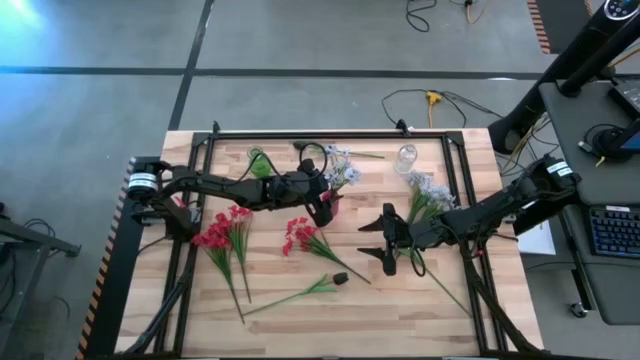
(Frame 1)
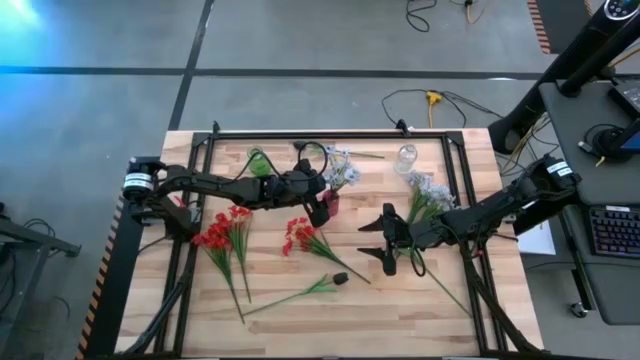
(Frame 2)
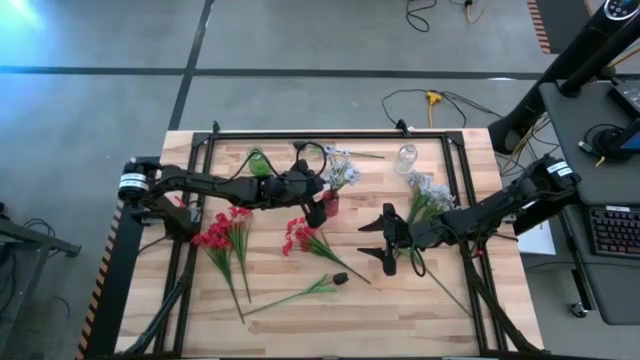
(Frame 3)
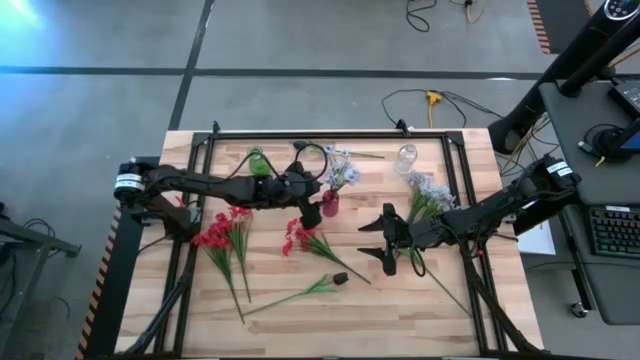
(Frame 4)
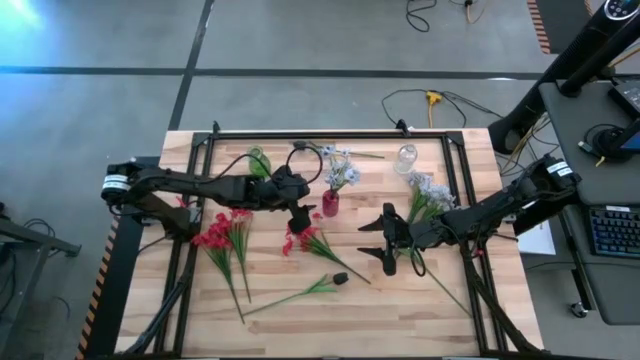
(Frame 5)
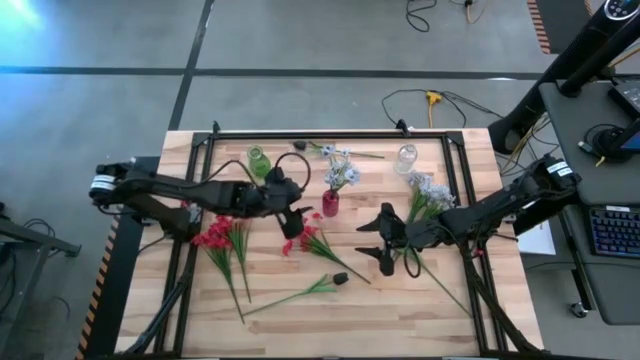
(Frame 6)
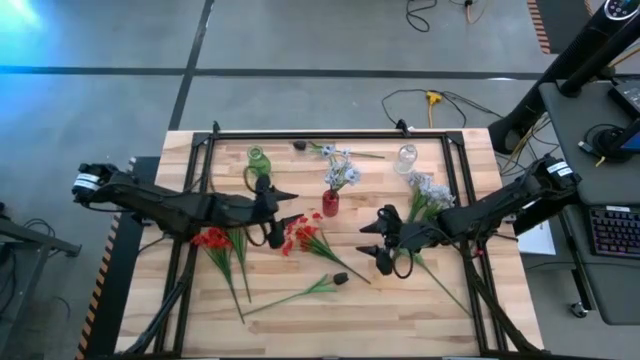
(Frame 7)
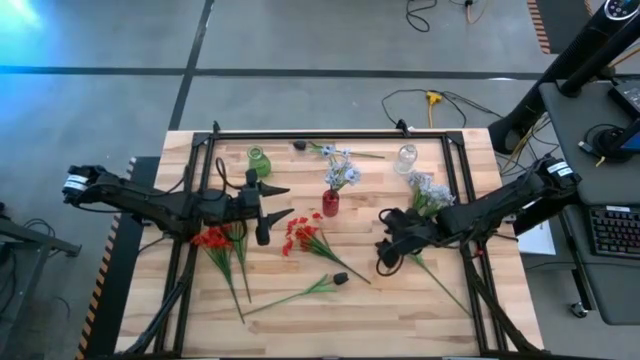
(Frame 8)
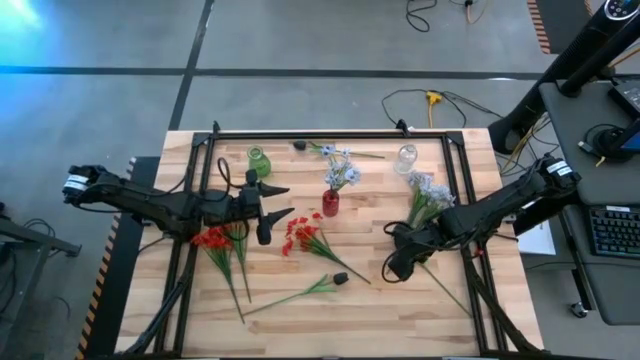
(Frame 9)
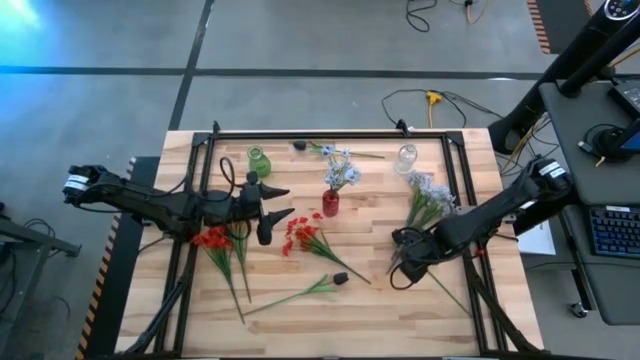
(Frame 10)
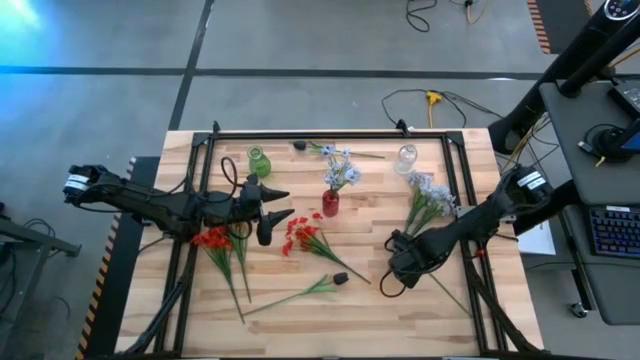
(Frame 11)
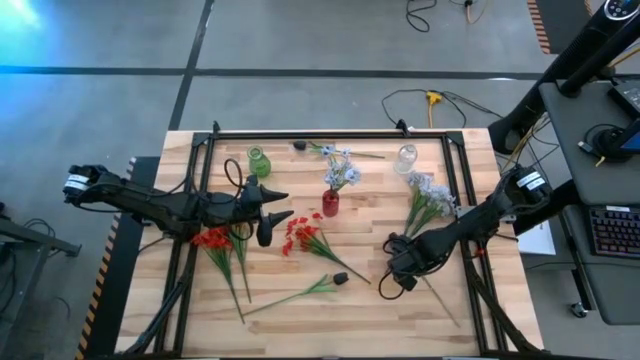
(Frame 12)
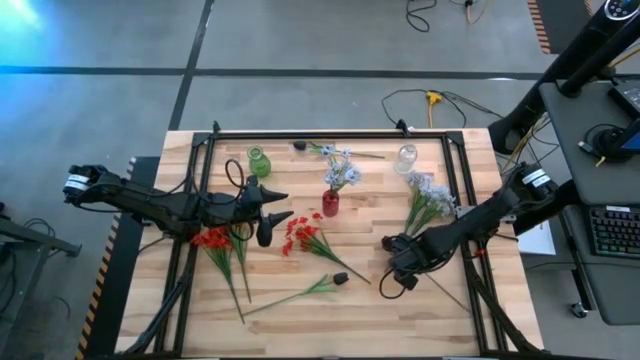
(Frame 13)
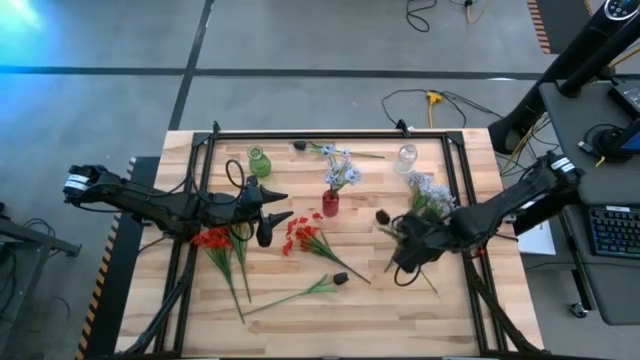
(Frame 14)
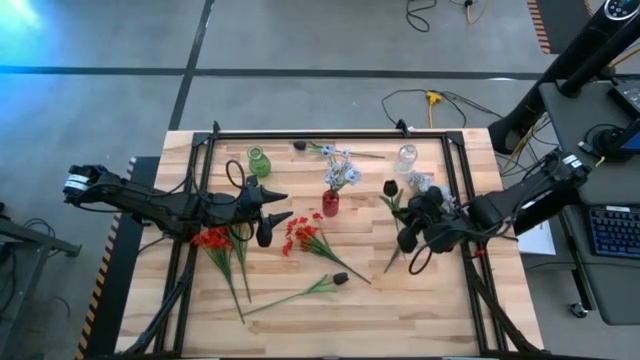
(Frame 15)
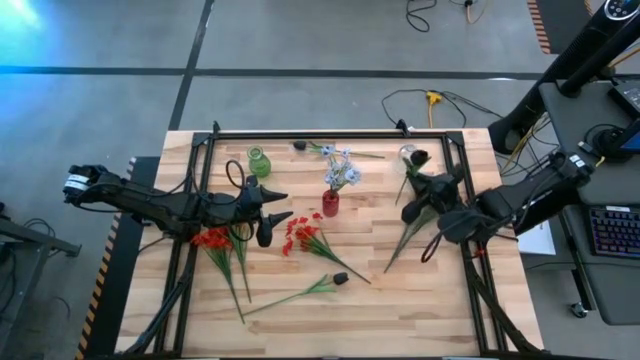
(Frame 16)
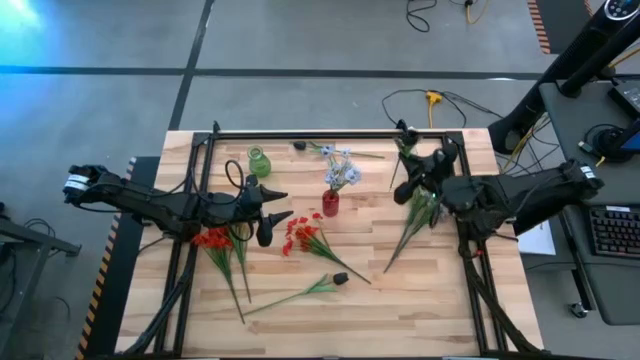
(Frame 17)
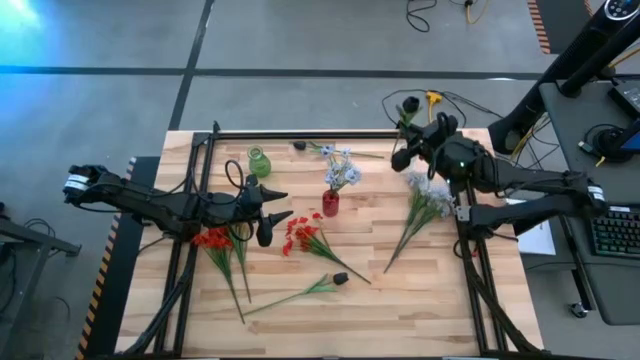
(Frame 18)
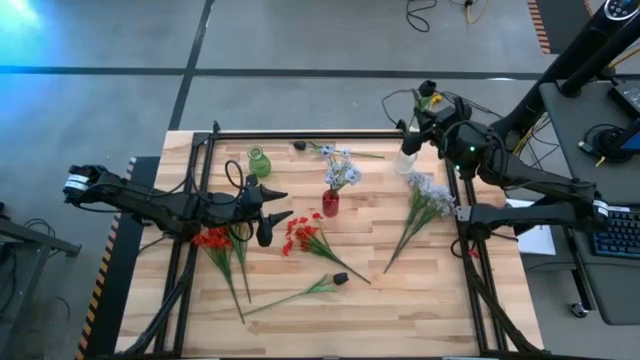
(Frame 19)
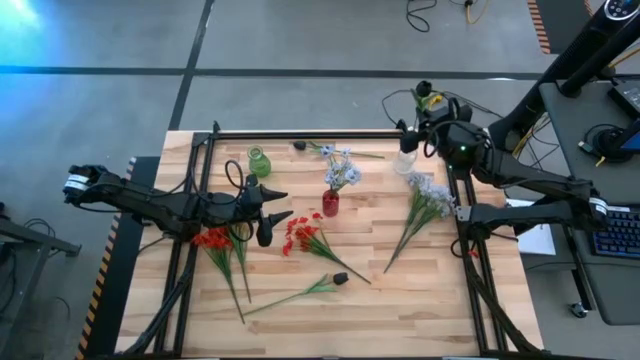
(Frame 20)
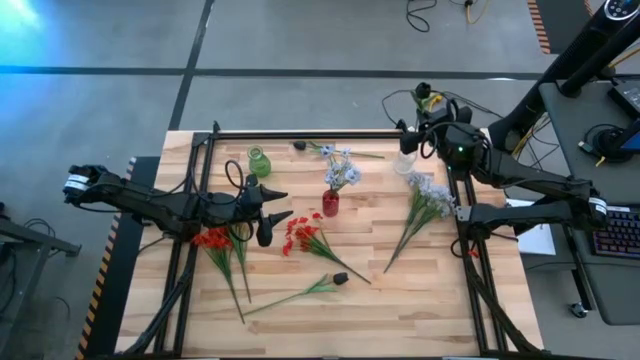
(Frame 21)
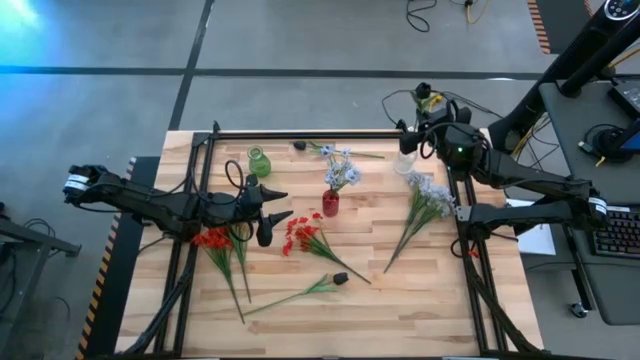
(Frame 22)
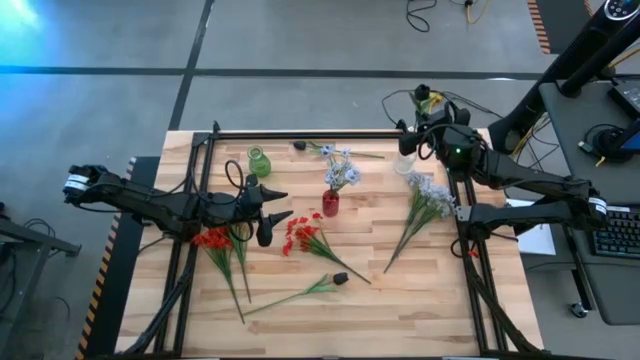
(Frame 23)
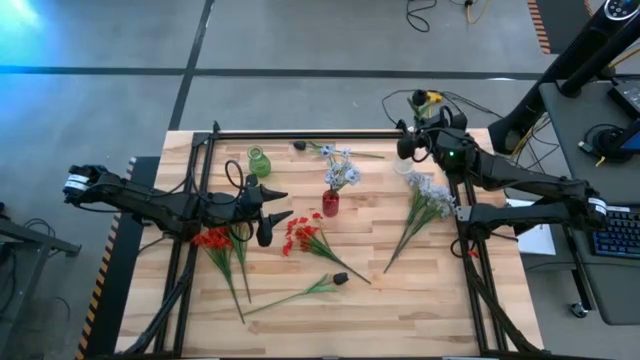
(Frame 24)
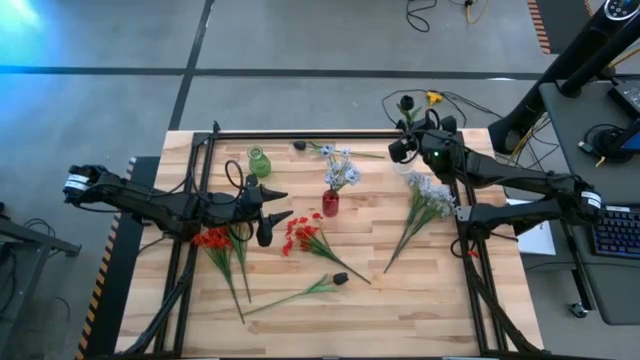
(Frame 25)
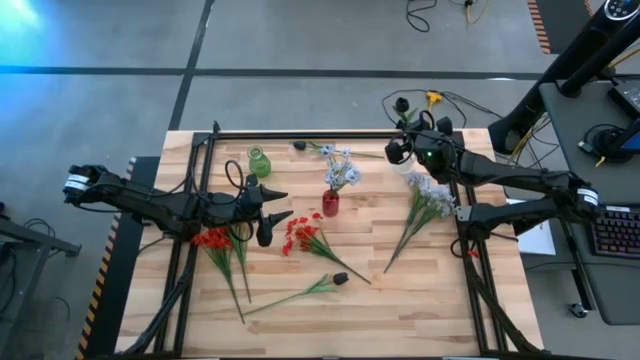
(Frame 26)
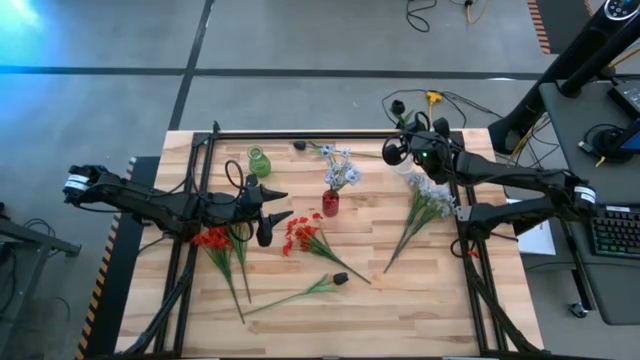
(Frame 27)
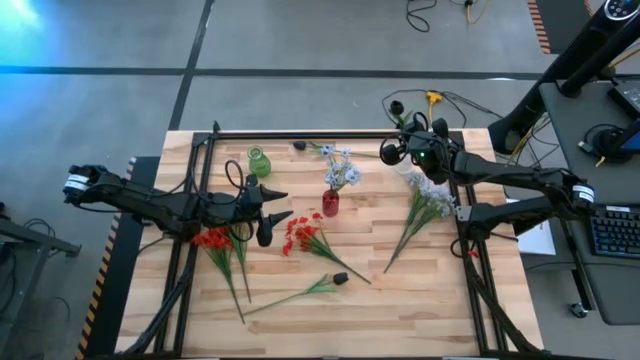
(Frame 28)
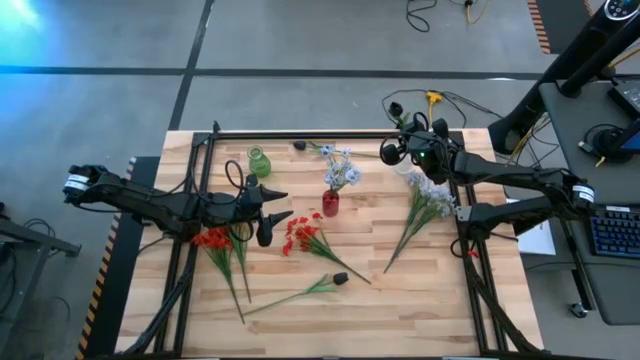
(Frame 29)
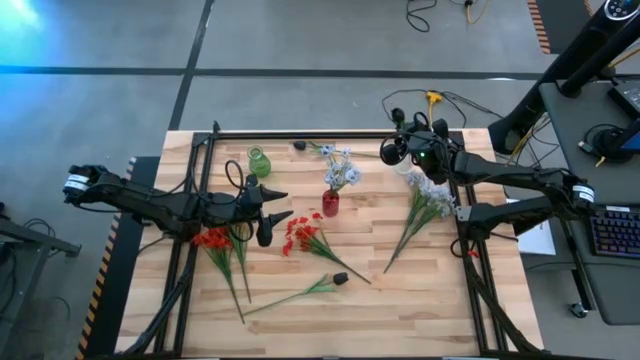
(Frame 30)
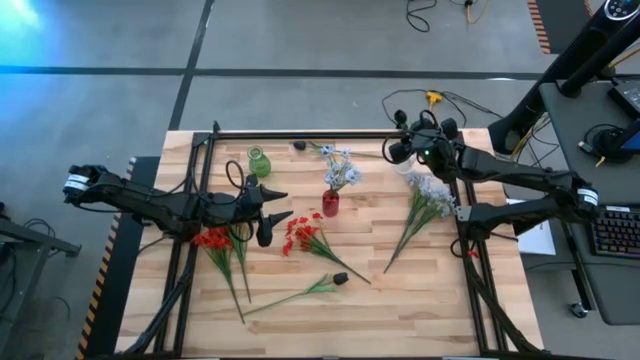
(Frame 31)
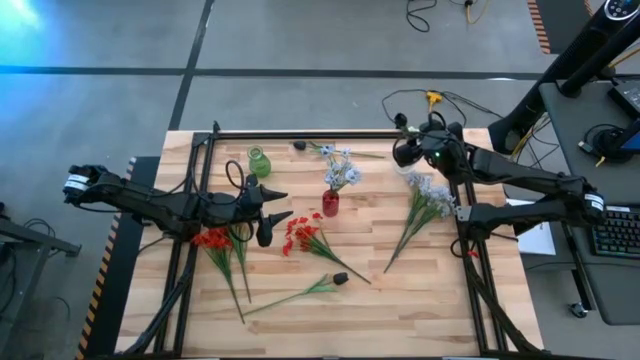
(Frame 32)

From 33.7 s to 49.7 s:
Task: Sort flowers into vase by color
Put the bottom right black flower into the transparent vase

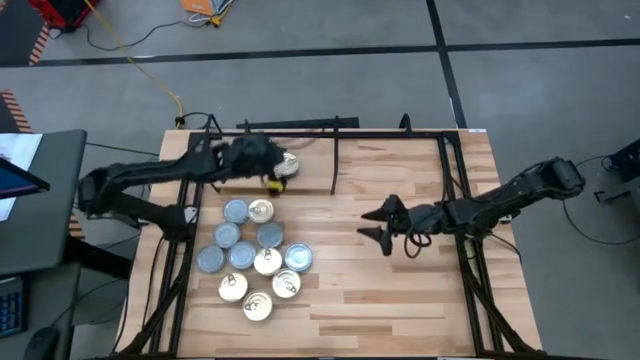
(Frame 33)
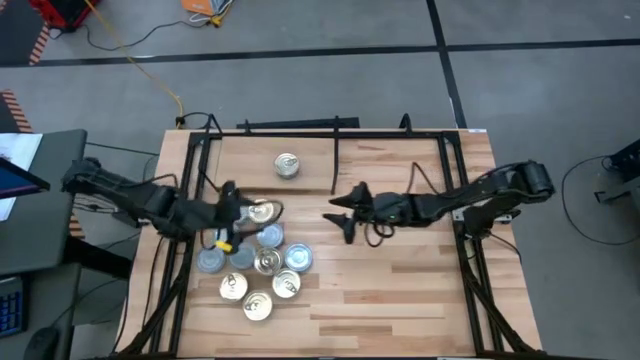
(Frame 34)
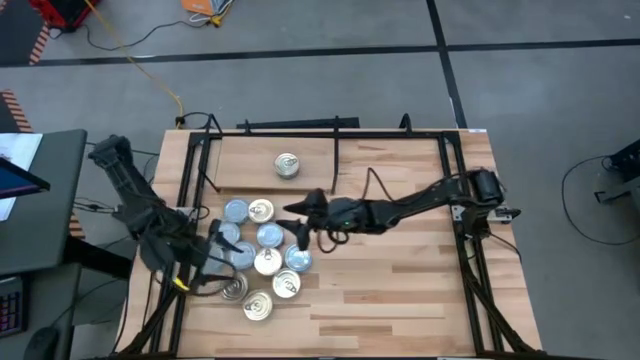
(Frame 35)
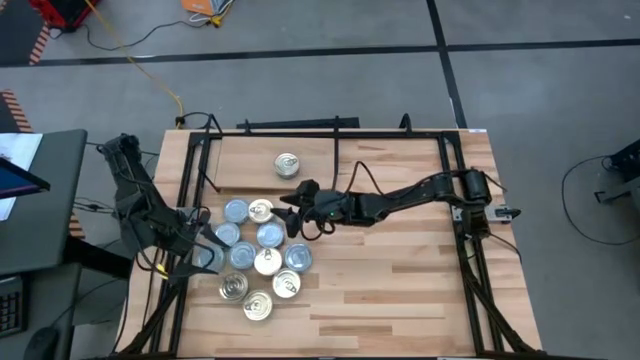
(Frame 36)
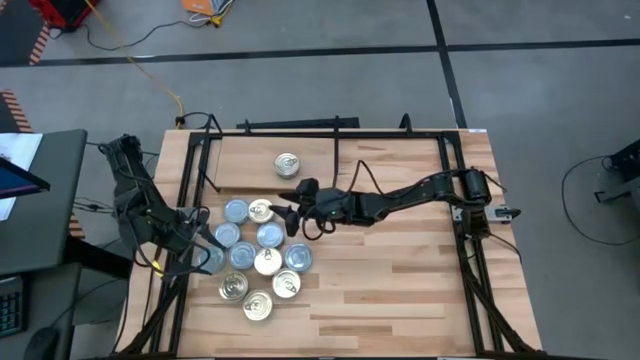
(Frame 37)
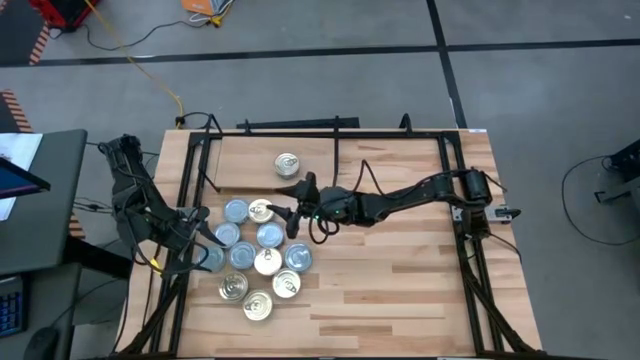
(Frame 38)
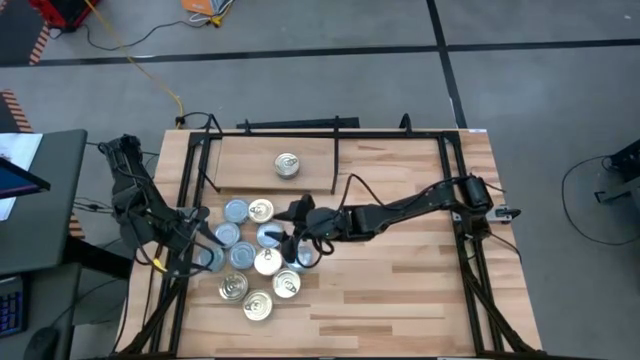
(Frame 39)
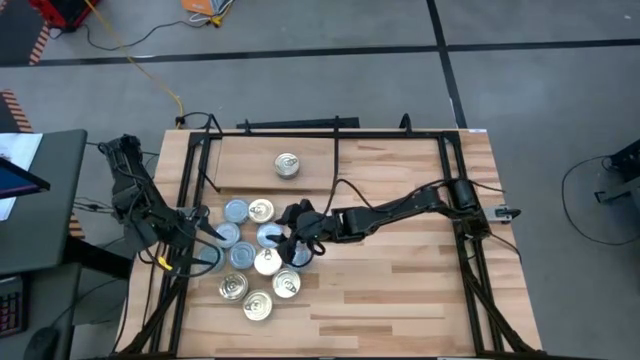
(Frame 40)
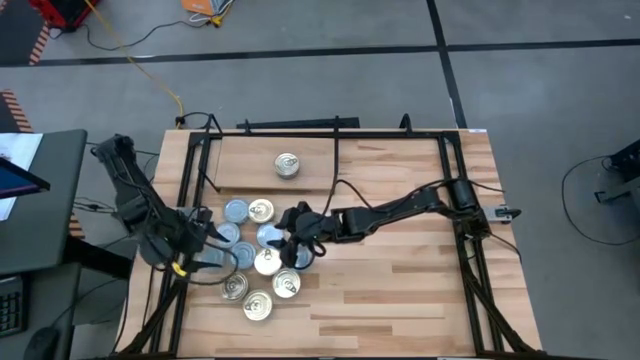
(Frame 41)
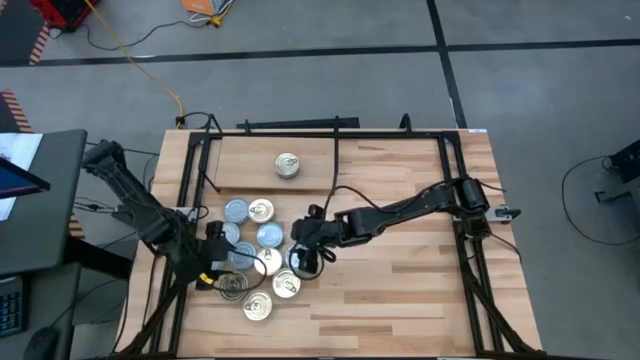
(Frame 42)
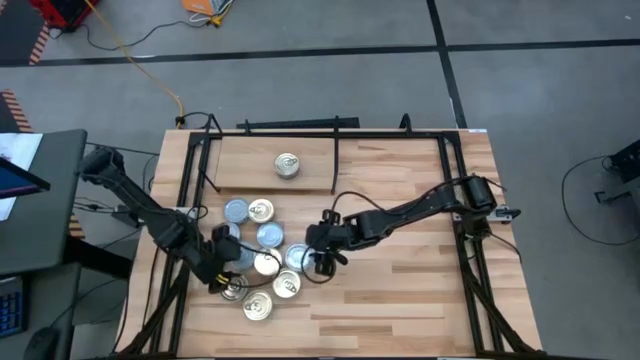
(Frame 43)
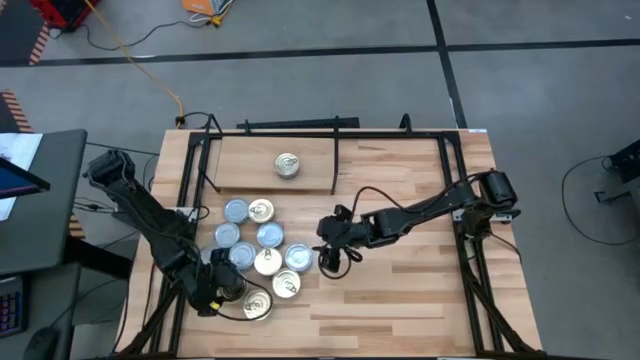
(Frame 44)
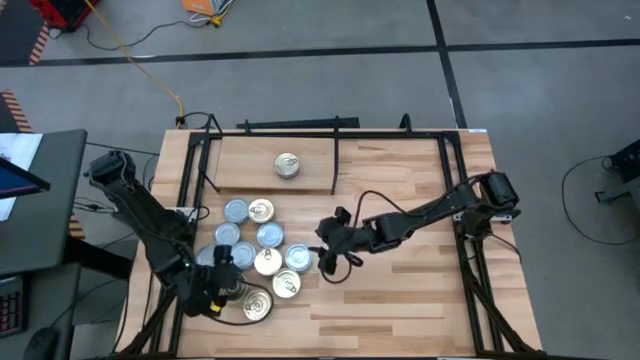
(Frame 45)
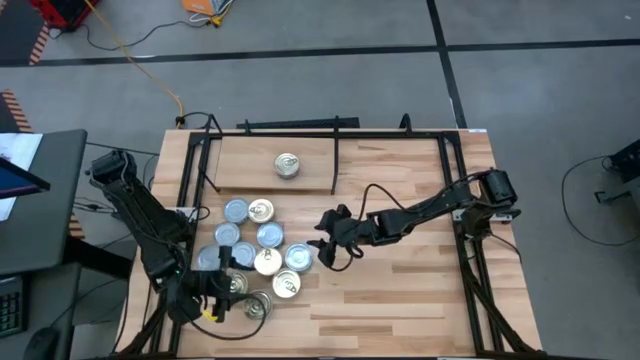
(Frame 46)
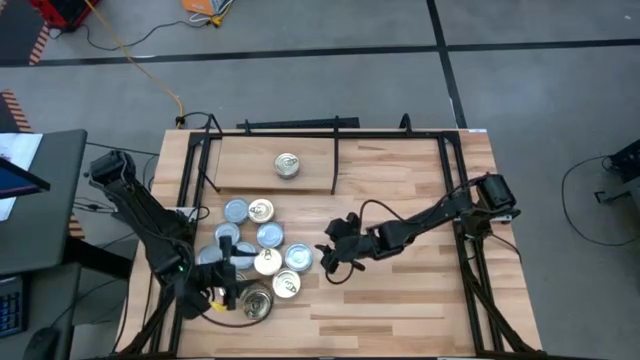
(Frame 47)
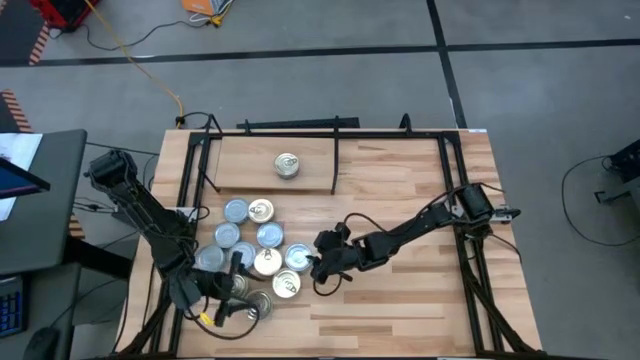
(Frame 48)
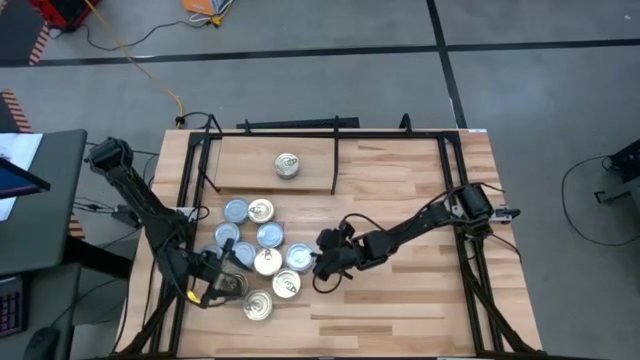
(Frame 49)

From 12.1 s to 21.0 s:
Task: Stack canned seafood by type on shelf
Put the green tuna can on the shelf
